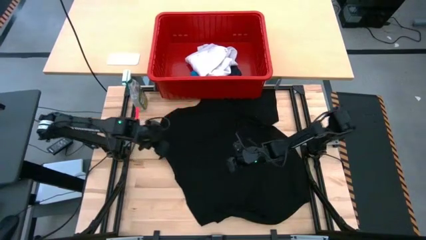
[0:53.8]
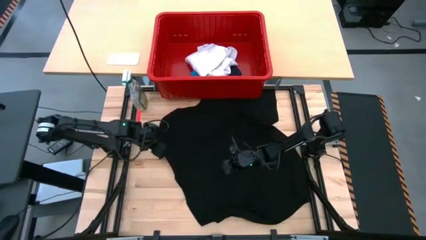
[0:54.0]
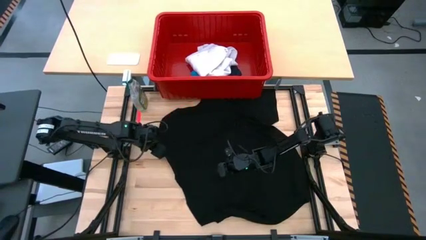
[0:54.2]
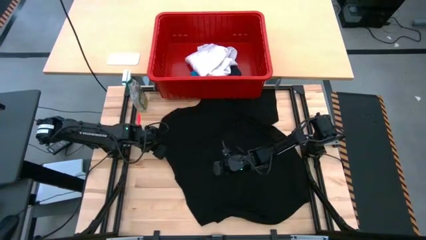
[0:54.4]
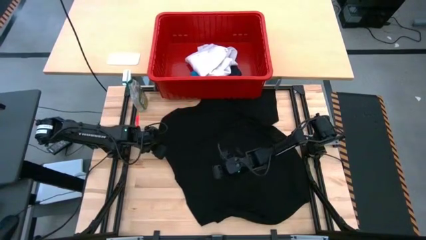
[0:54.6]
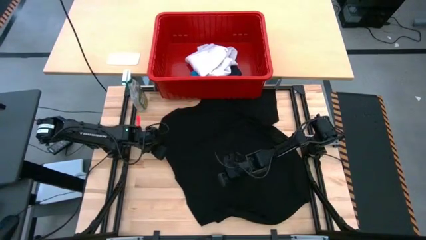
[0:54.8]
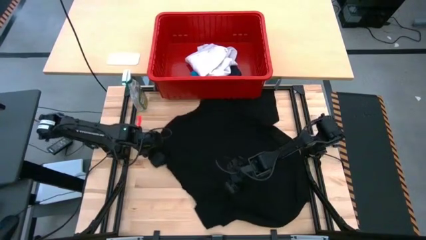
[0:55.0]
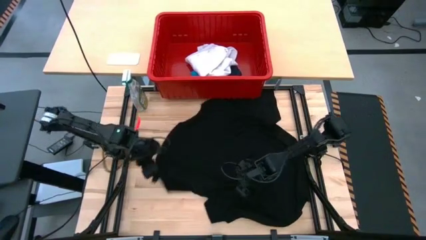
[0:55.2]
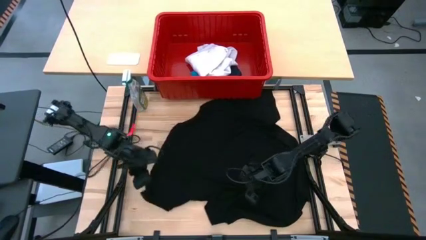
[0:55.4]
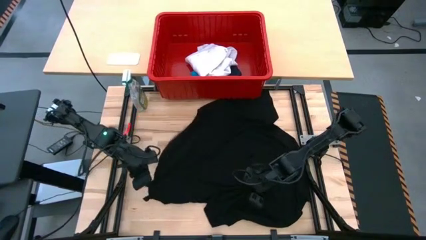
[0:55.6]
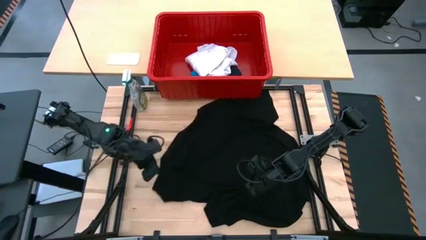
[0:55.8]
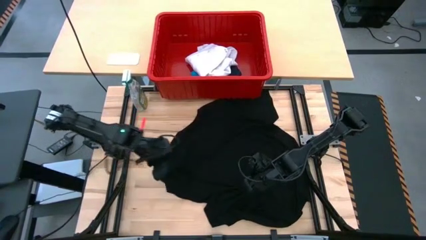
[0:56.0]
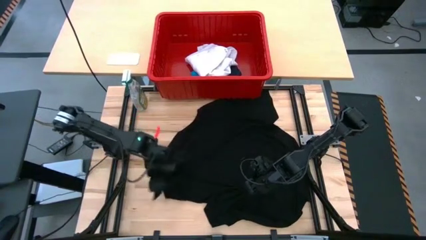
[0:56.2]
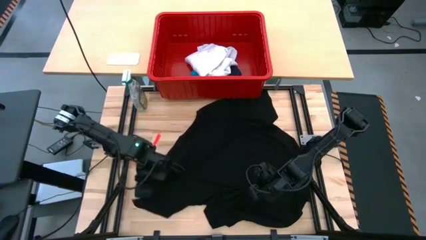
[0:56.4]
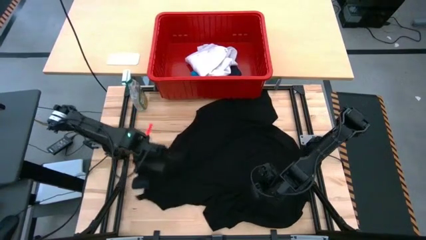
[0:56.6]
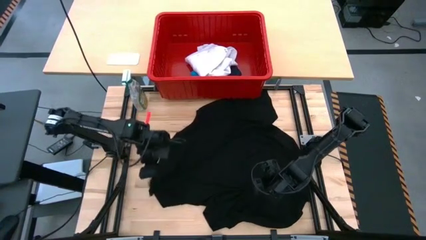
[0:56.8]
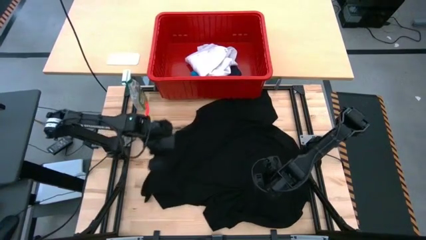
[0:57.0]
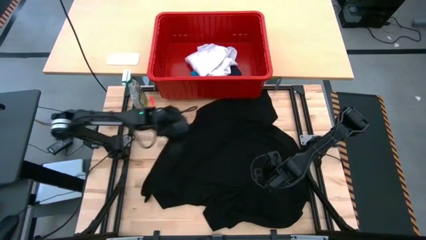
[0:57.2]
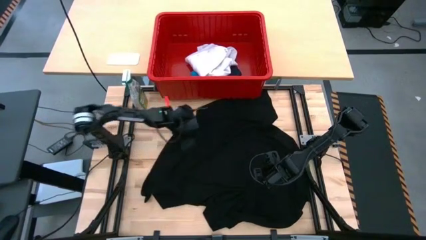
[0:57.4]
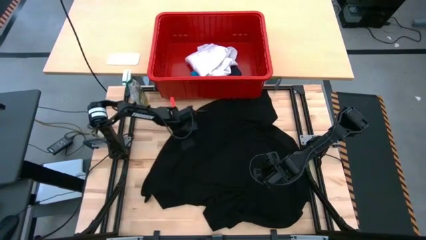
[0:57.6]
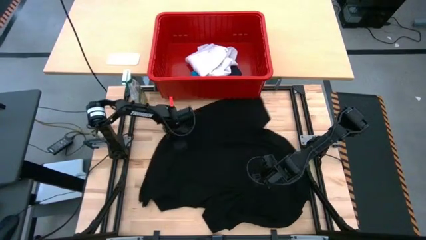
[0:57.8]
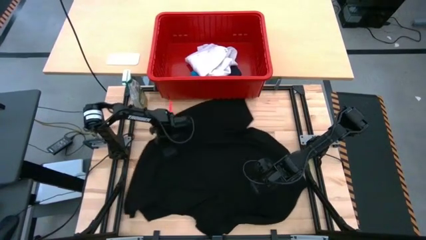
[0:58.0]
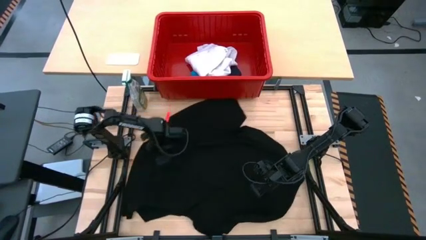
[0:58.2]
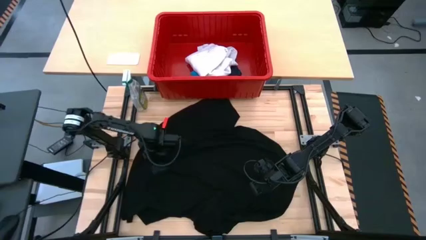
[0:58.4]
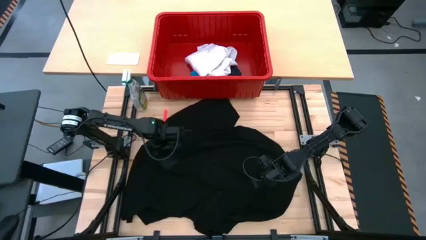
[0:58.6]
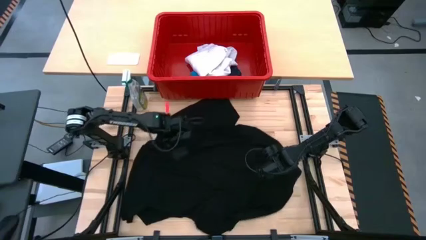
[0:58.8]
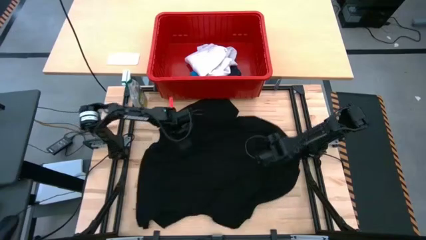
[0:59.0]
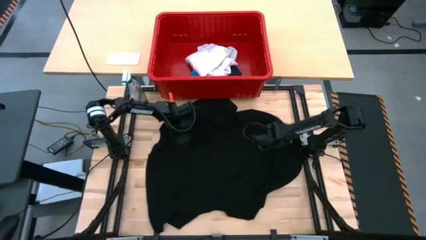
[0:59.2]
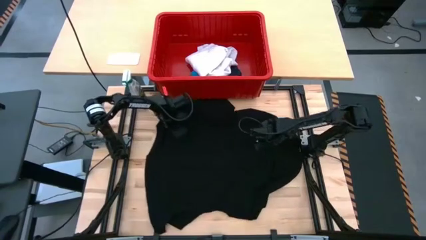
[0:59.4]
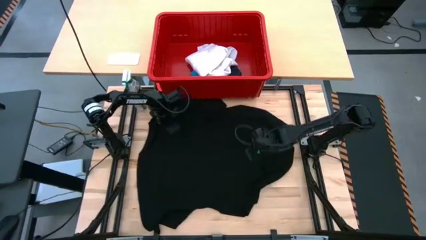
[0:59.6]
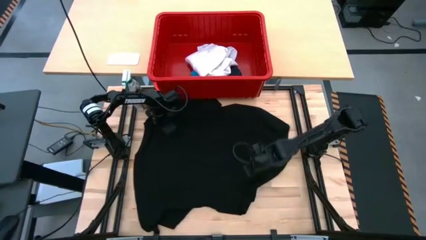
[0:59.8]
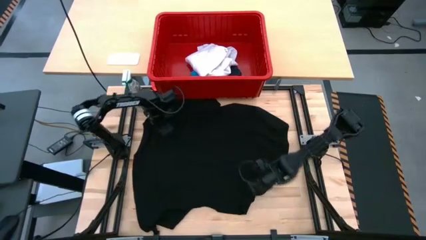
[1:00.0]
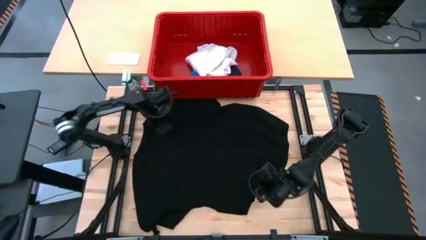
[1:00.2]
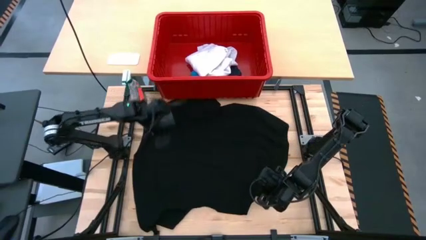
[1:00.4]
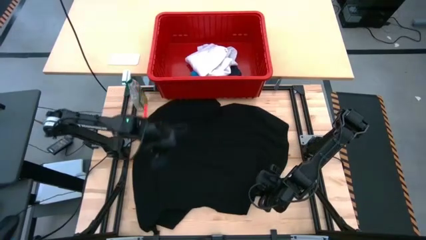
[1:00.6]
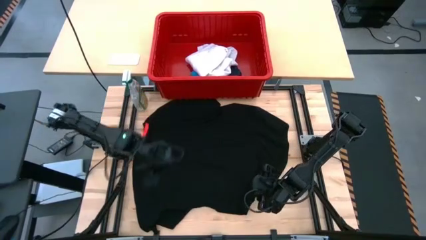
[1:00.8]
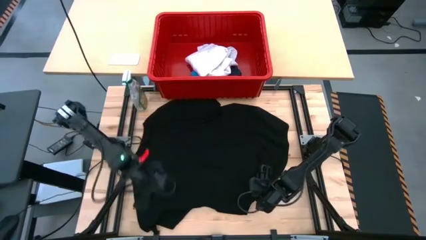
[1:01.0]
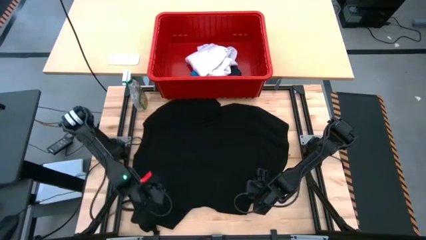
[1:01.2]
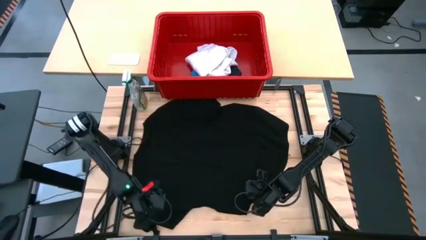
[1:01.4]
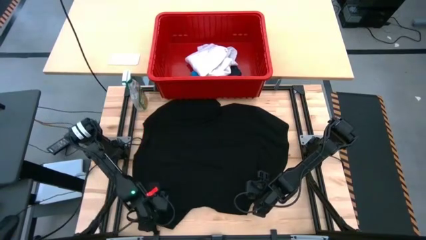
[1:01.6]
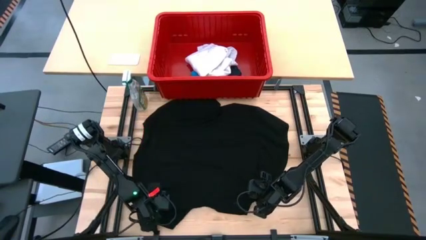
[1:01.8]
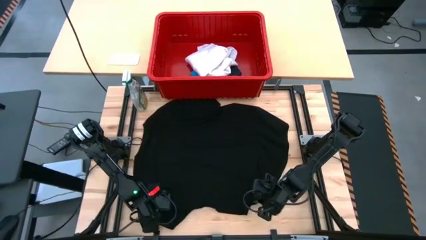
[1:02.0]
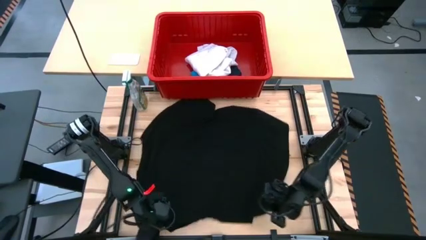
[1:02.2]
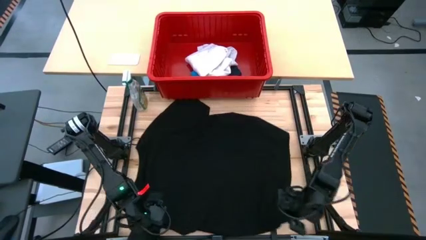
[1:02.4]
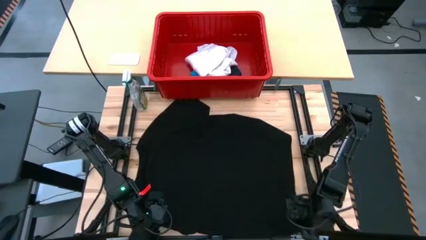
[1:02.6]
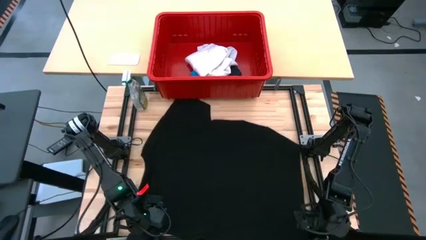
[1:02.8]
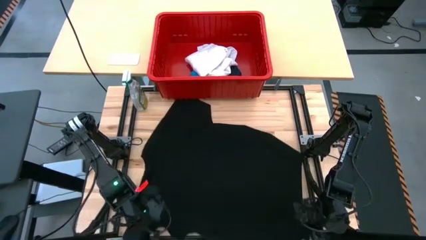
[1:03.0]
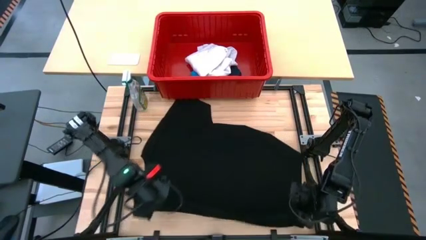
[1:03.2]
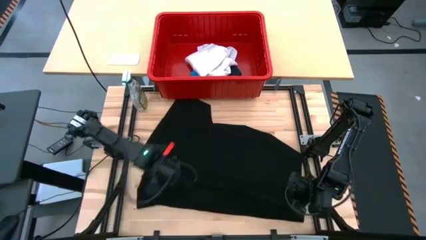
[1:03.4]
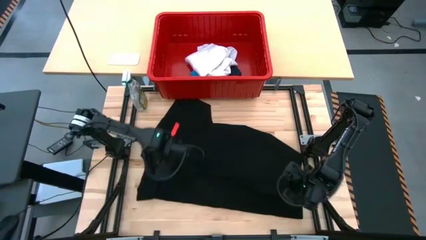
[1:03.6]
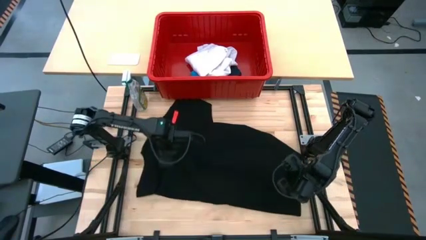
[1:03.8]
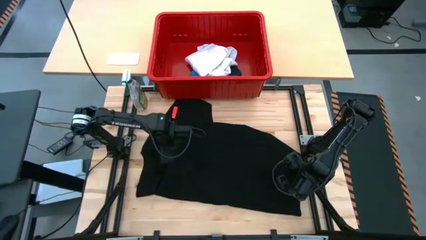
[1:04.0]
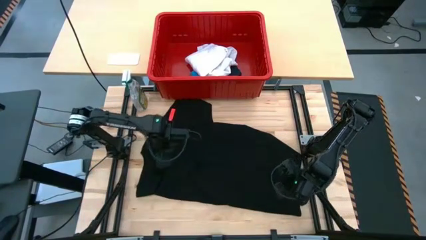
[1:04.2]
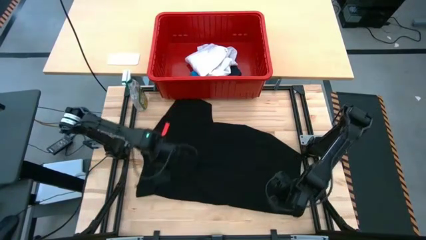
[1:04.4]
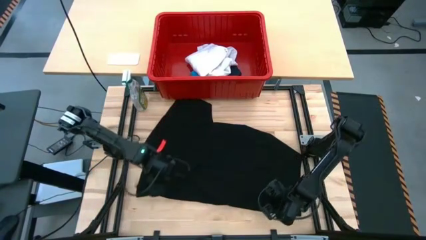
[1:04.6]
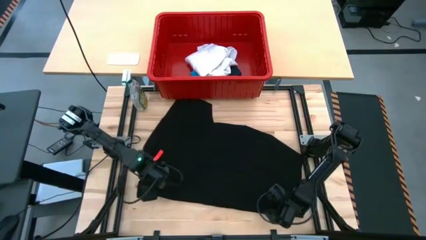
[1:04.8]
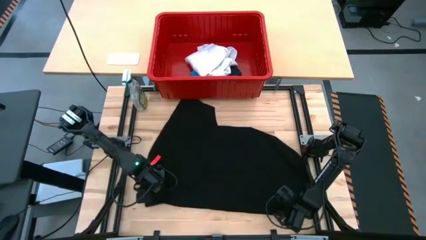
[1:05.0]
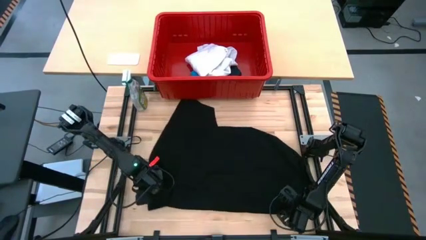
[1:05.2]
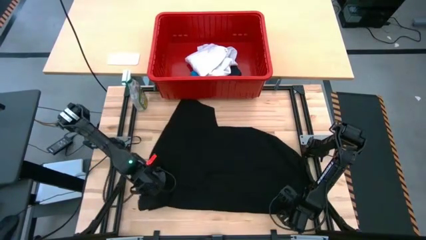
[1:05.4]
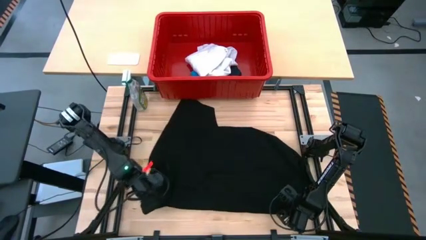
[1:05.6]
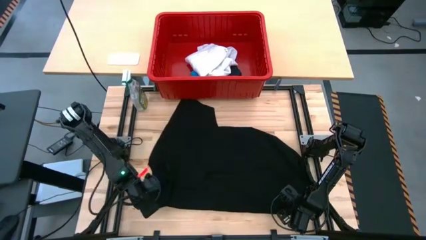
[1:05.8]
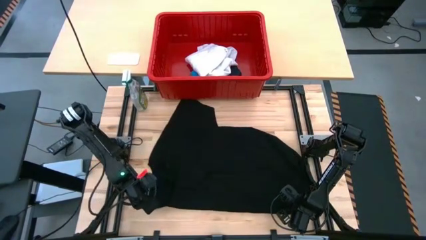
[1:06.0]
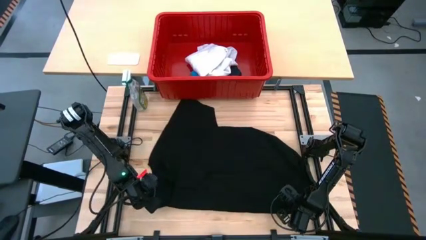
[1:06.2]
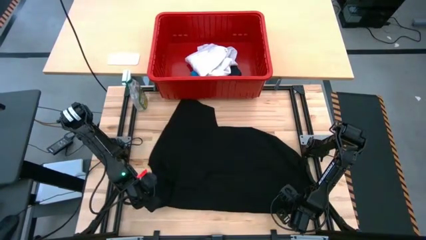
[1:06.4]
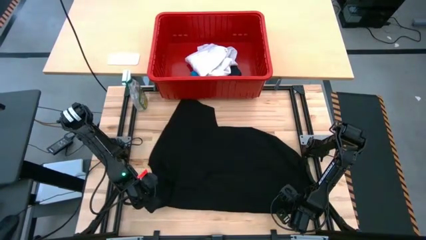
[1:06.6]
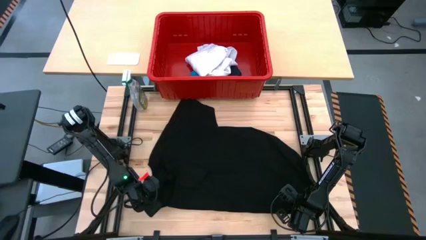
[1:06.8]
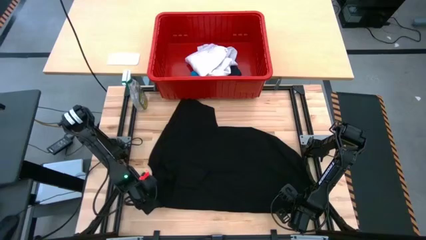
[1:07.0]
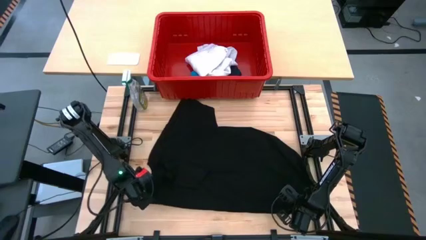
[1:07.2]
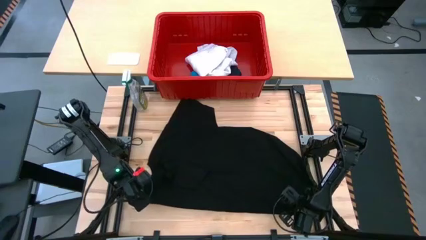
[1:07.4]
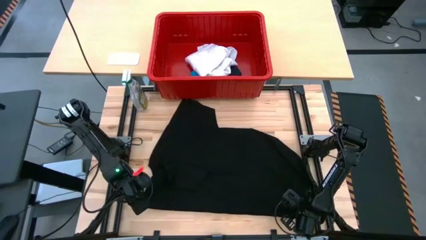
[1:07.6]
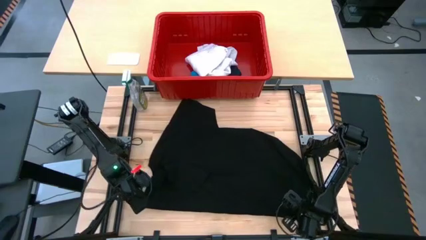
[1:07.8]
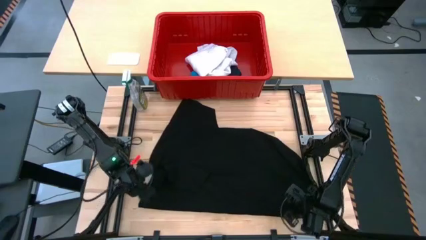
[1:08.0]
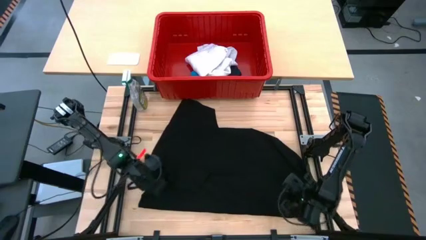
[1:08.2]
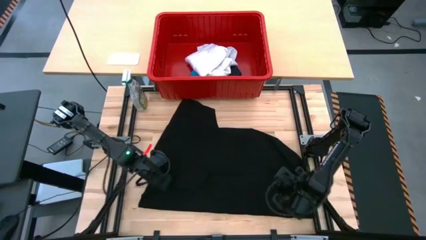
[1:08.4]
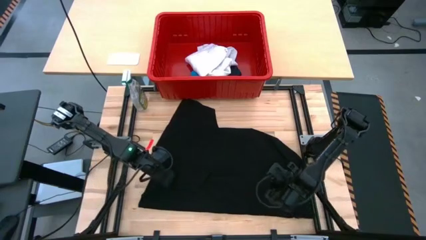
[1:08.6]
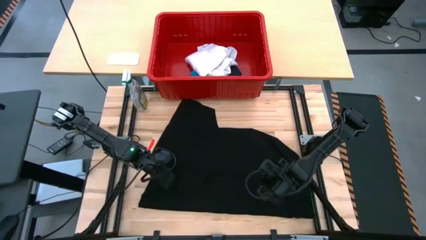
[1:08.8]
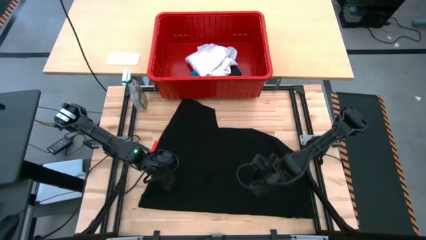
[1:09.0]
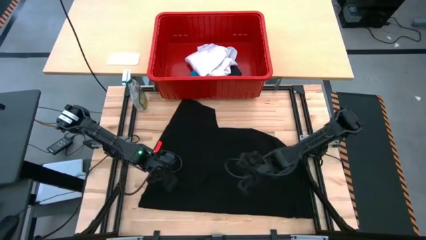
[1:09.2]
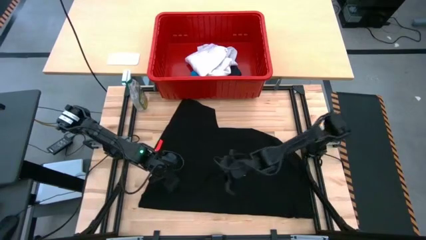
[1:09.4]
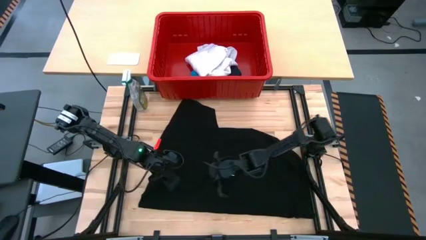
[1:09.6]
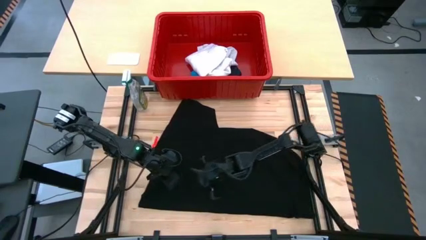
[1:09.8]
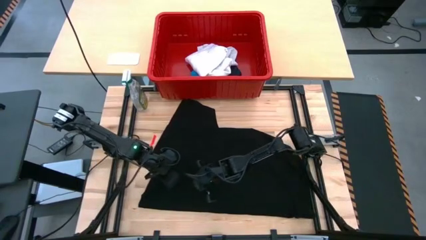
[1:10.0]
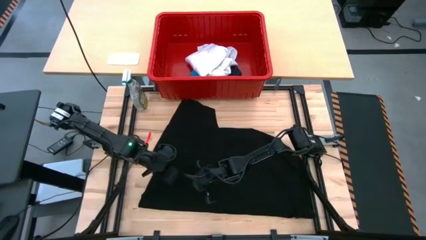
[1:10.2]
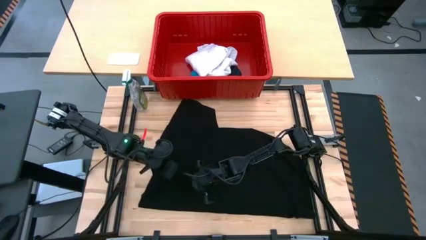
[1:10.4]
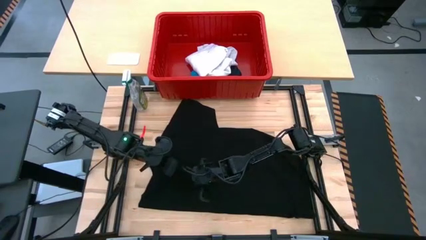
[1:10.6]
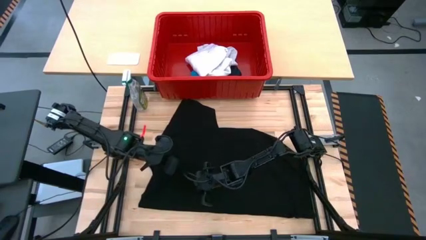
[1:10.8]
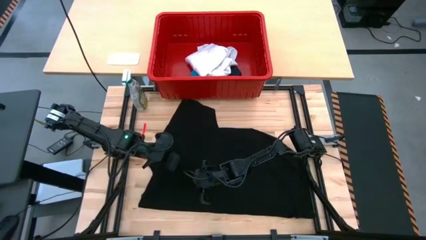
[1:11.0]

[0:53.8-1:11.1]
Task: Fold laundry
Fold the black shirt on the table
